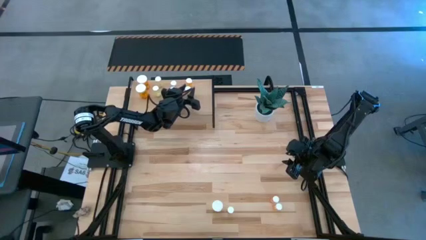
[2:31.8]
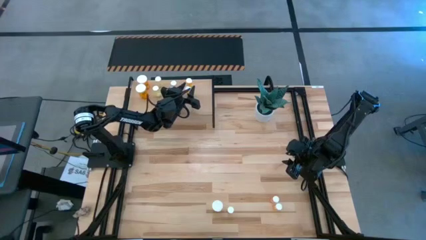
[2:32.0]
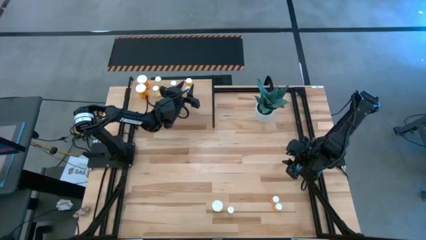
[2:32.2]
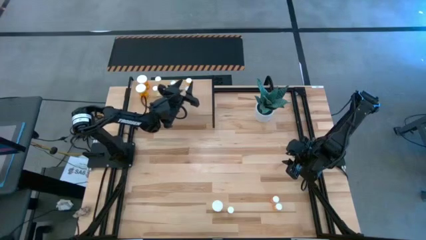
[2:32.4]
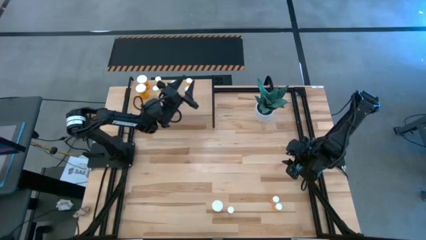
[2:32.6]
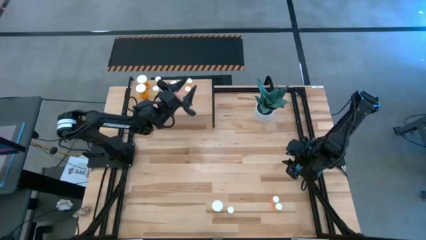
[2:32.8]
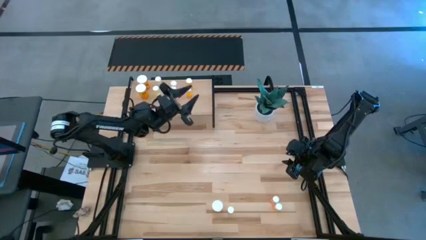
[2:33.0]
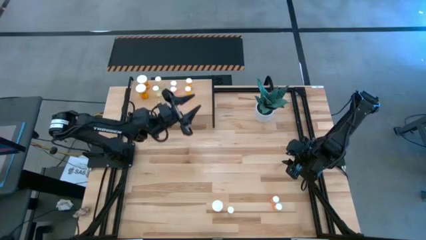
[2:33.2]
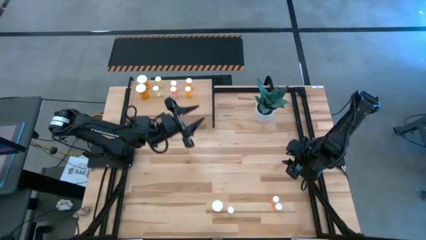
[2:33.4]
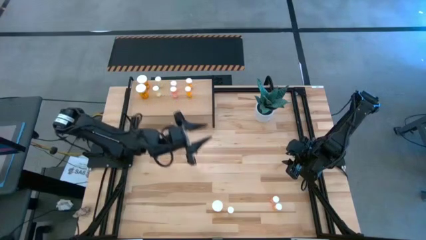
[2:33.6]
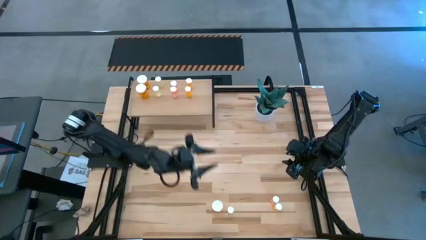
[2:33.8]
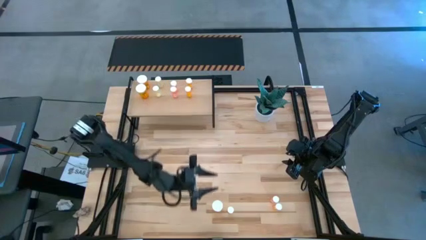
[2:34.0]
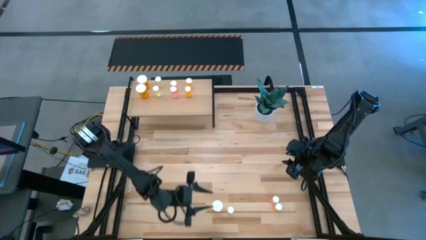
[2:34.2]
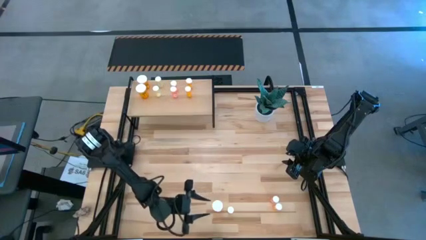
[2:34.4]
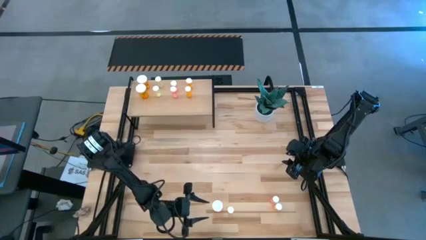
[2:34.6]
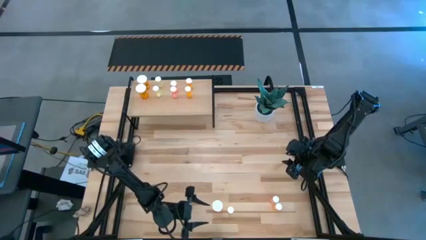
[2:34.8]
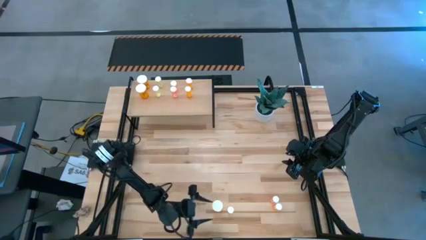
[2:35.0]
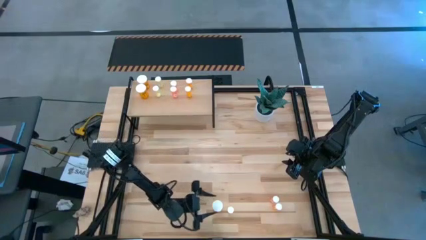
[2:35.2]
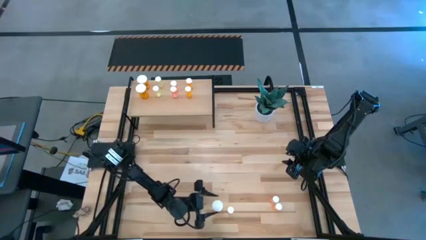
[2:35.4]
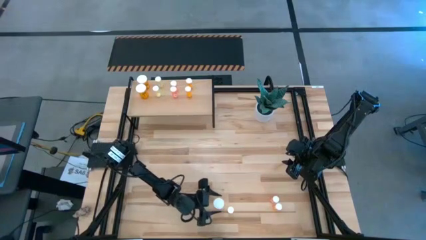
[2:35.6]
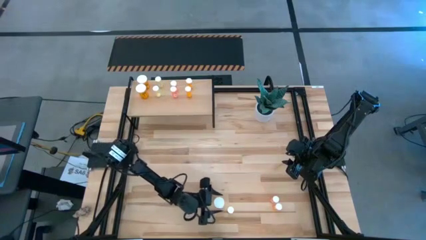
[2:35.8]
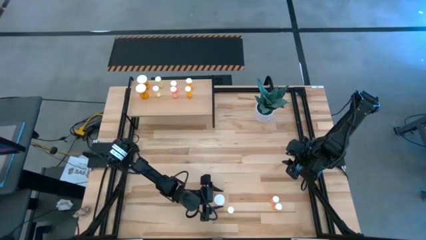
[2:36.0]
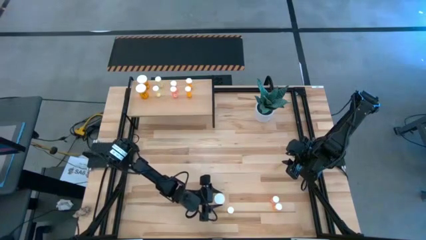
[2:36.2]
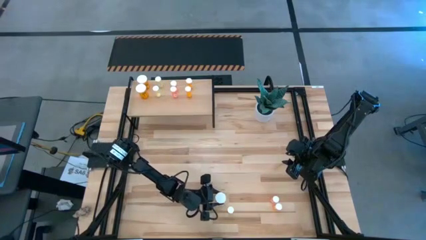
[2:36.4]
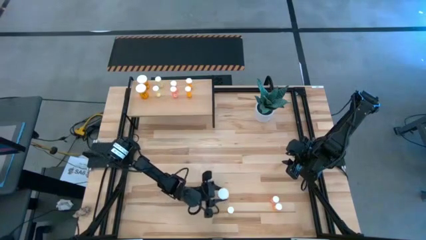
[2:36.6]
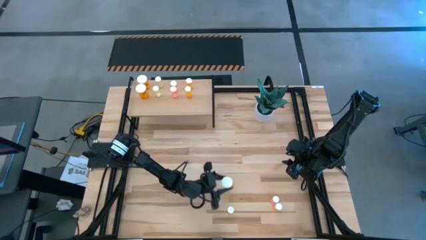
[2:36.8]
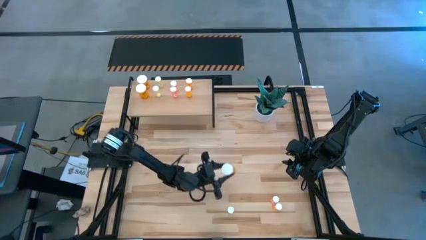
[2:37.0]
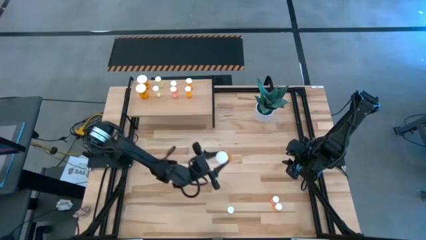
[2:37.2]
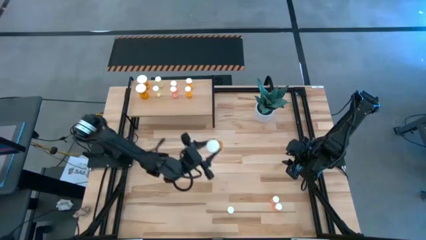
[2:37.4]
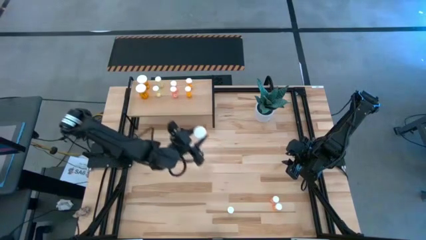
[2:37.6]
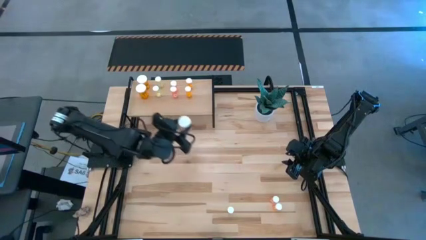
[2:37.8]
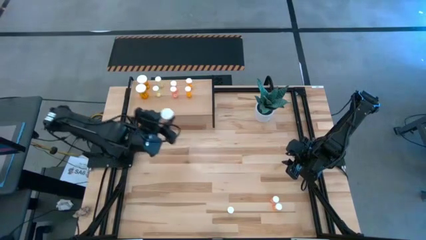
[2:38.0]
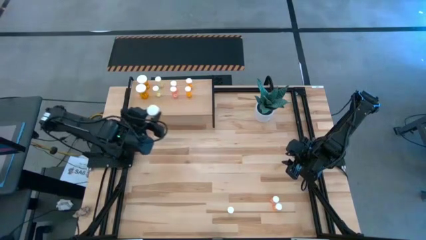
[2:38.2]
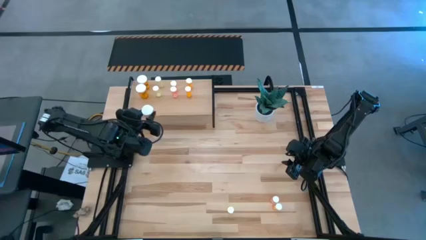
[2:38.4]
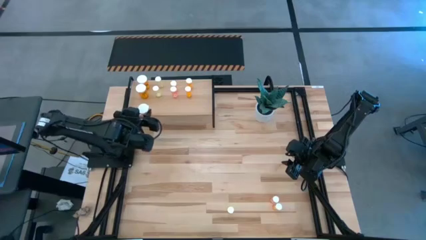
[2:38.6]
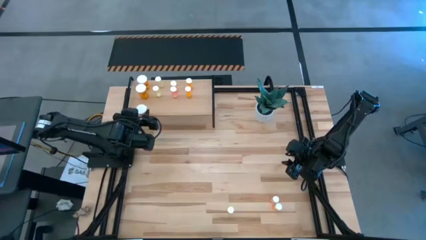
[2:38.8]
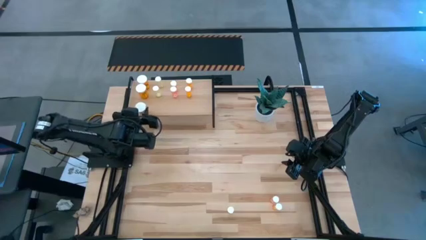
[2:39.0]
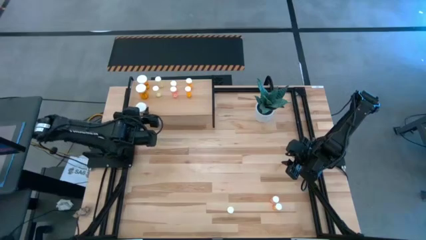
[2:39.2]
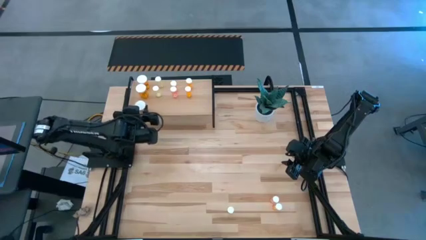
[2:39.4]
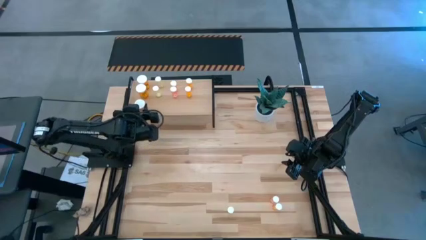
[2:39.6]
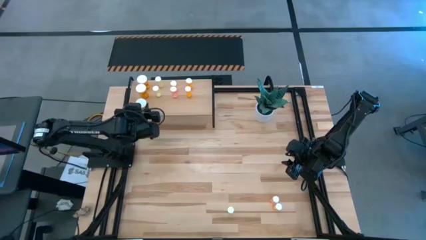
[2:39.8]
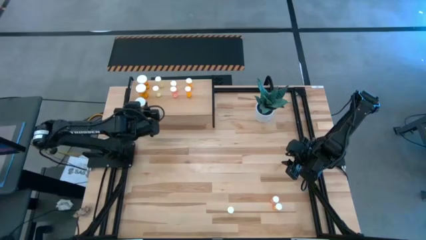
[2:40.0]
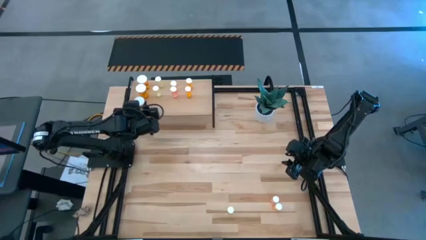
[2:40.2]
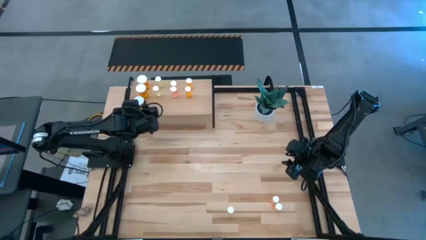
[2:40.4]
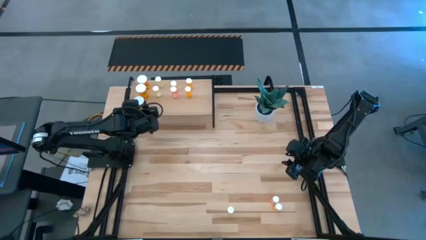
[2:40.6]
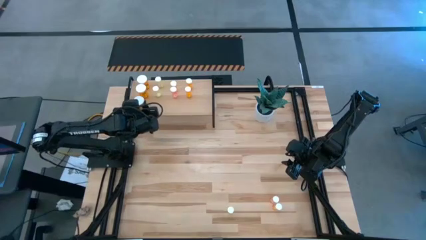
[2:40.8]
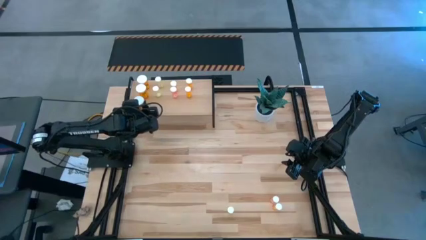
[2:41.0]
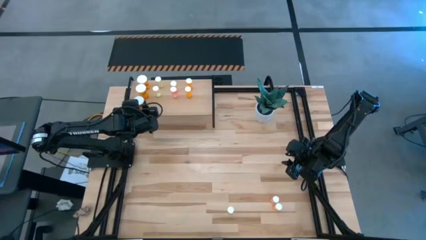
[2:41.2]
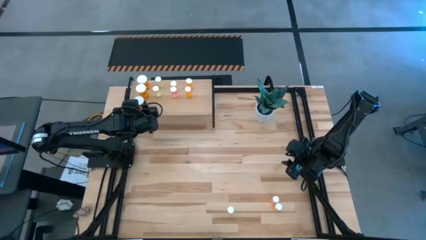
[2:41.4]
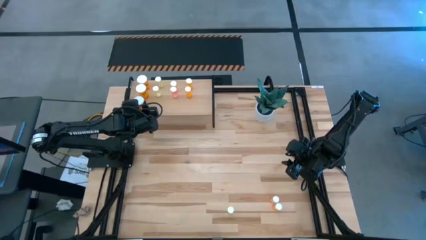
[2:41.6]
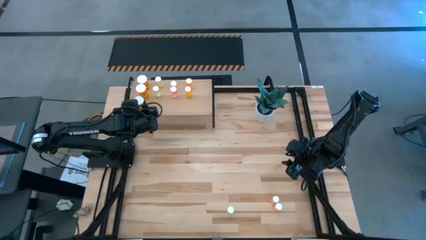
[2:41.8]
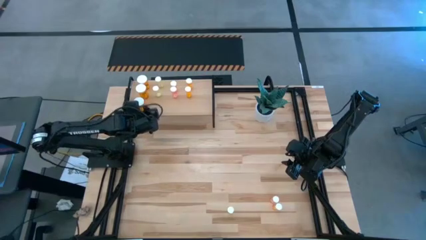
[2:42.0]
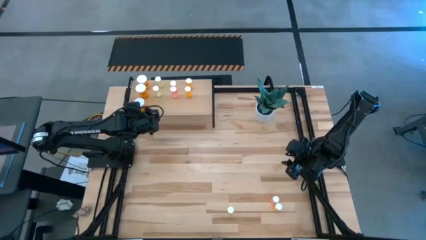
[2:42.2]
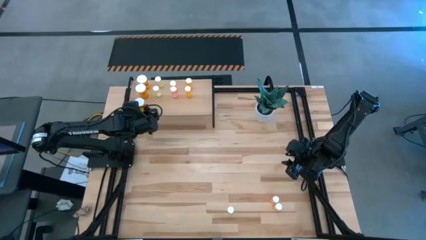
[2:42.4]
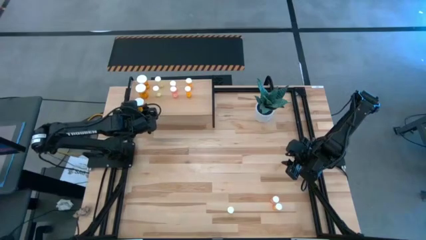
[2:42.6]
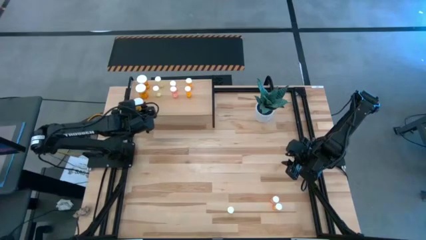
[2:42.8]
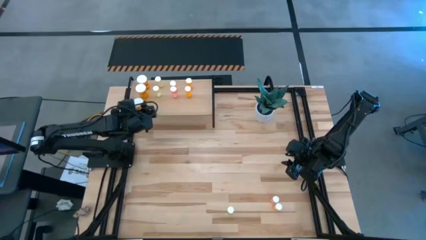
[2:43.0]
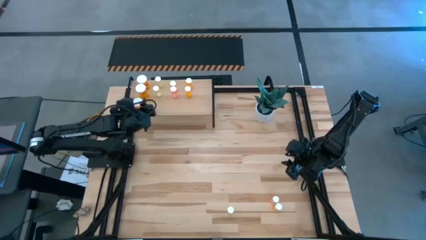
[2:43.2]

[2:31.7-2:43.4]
Task: Pick and place medicine bottles onto shelf by color
Put the large orange pill bottle on the shelf aligned with the other large orange pill bottles
